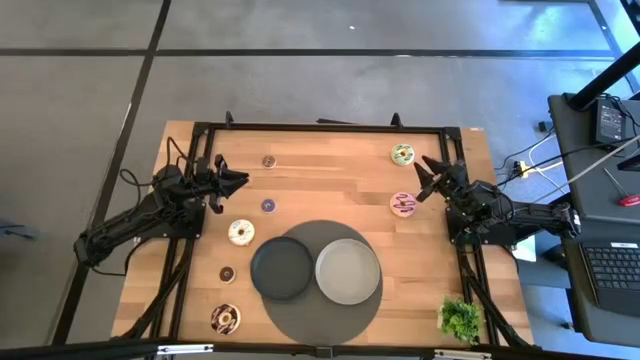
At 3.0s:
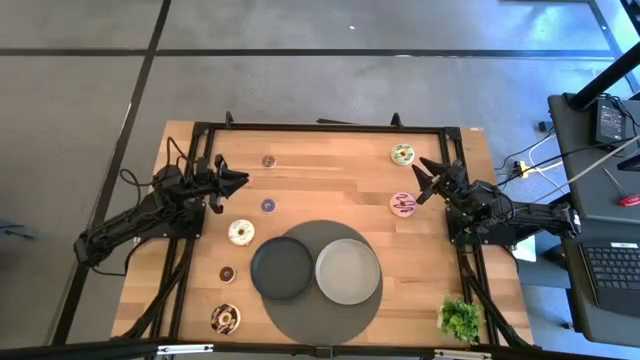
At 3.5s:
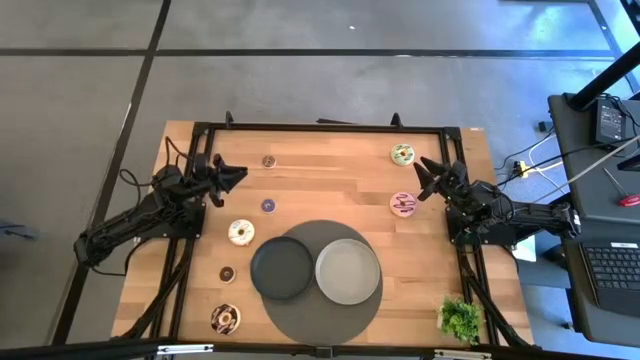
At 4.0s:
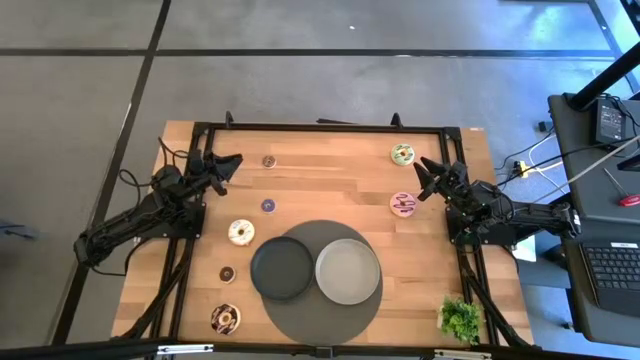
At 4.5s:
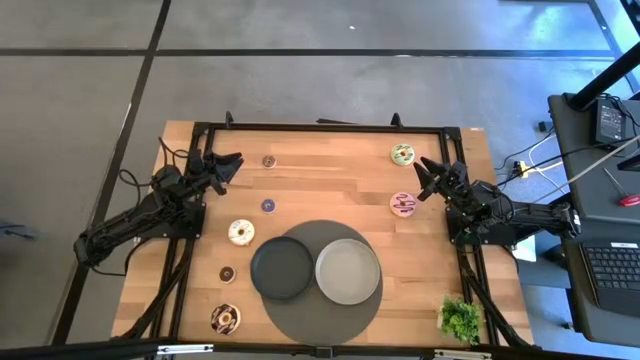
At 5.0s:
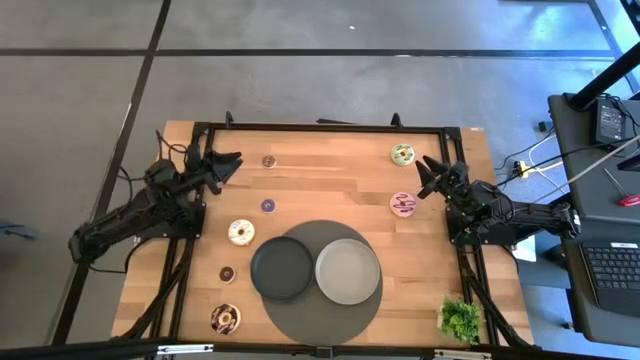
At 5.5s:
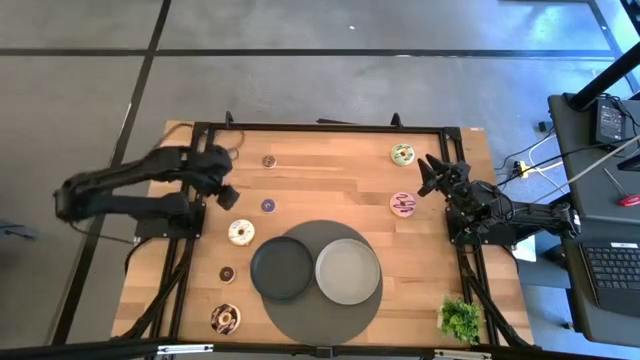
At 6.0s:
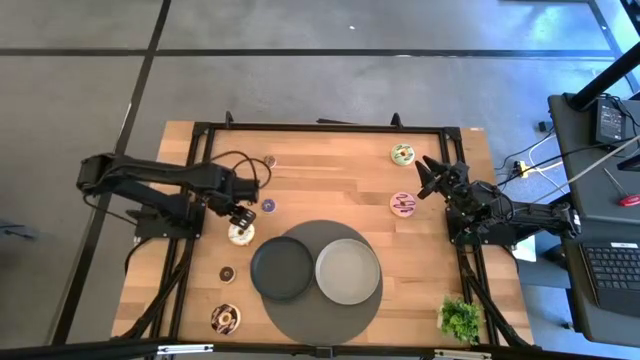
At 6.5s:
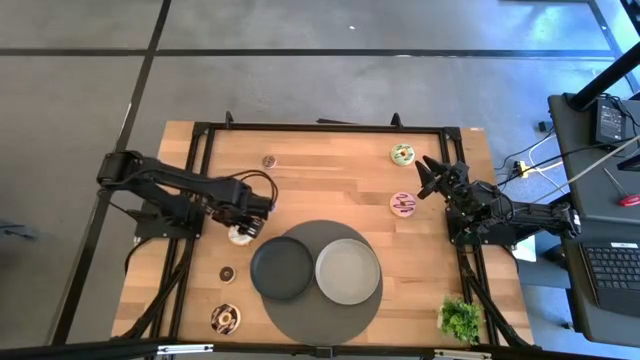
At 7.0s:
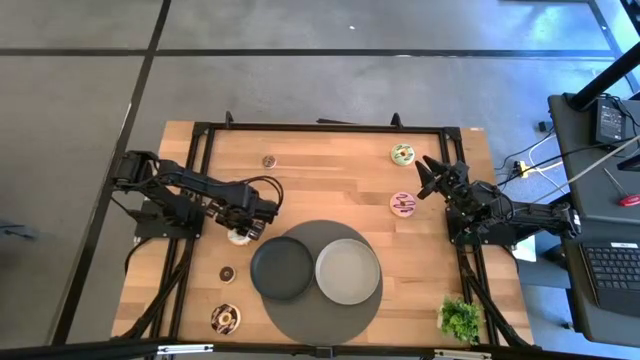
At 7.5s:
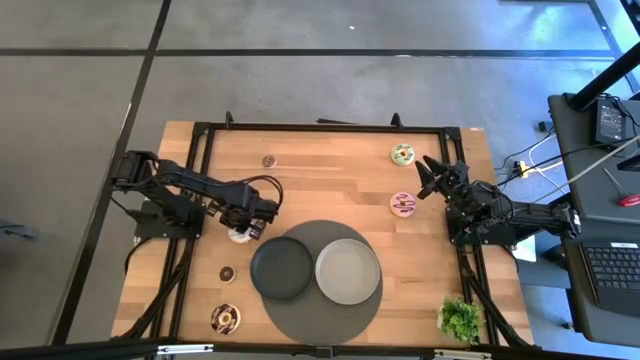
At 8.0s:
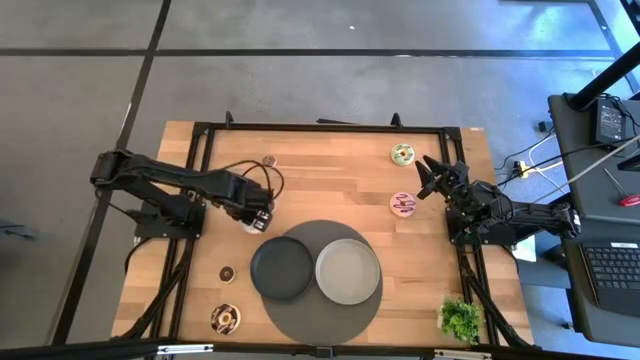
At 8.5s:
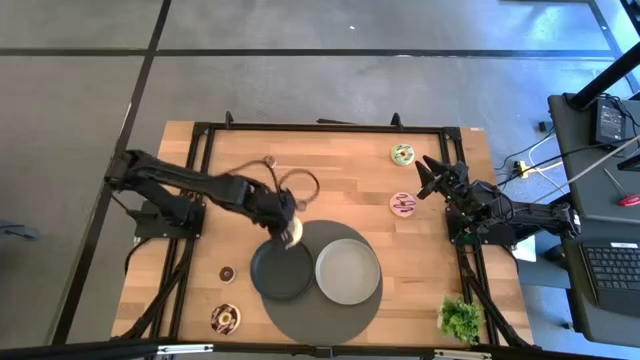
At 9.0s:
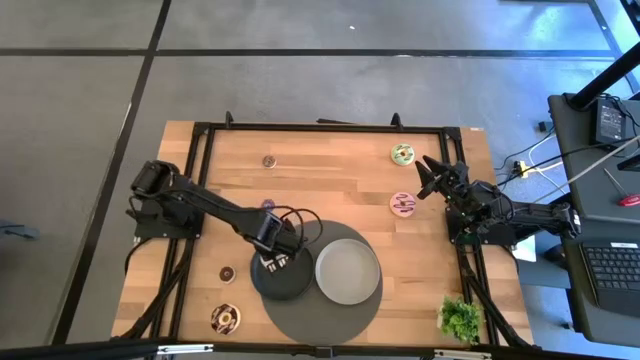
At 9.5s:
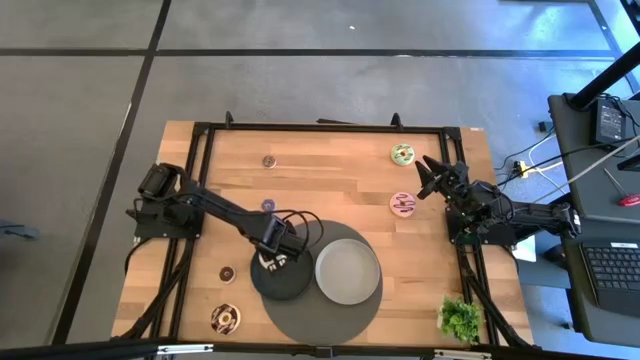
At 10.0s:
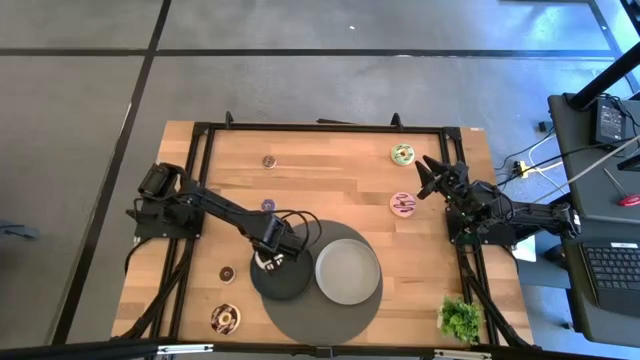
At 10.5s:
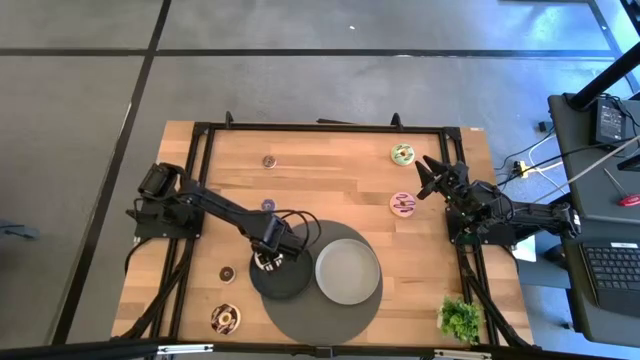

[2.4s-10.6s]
Task: Pick & Place donuts
Put the big white donut on the black plate

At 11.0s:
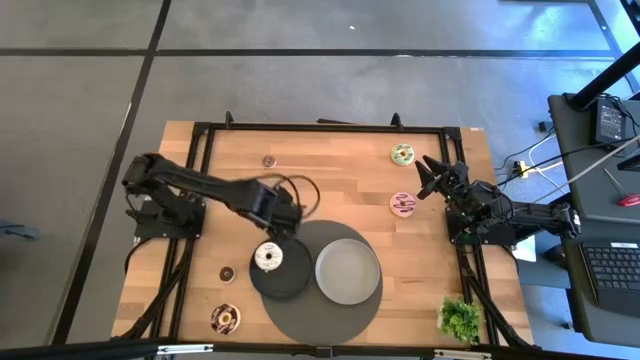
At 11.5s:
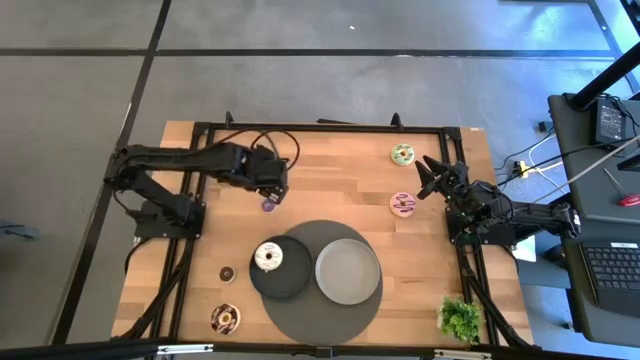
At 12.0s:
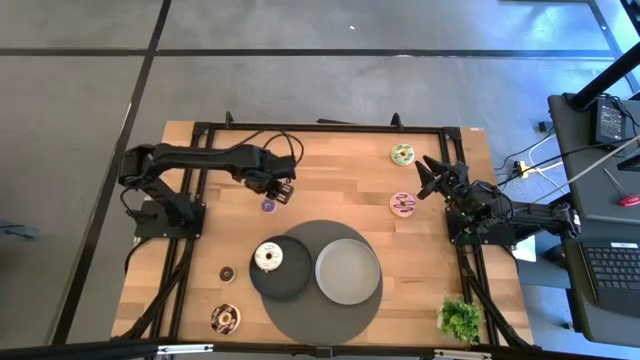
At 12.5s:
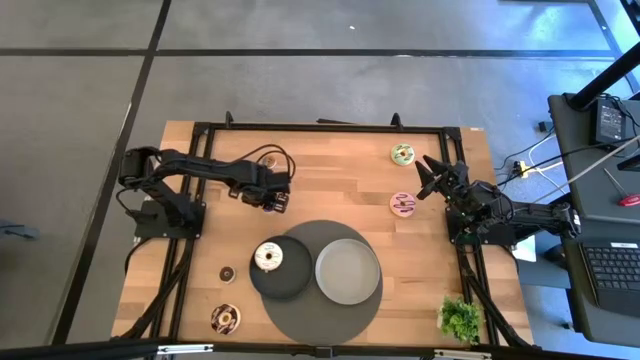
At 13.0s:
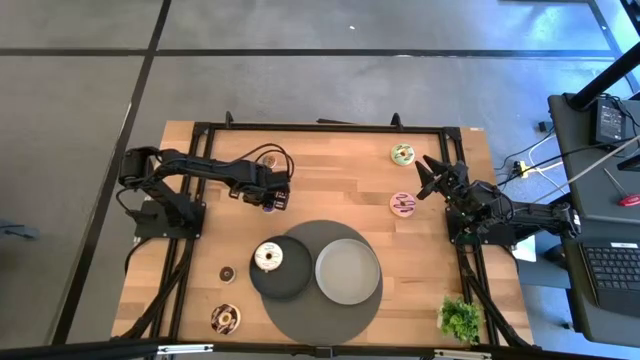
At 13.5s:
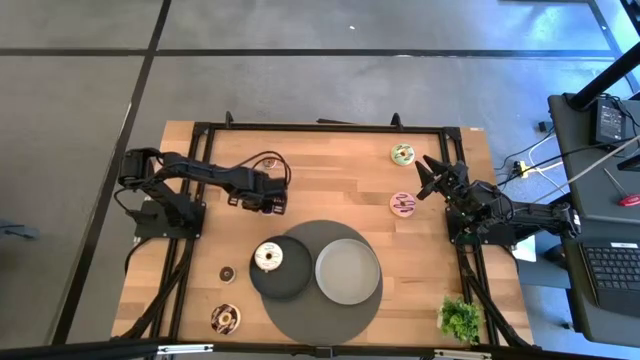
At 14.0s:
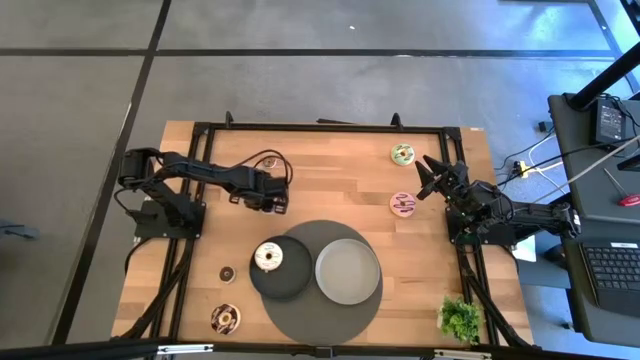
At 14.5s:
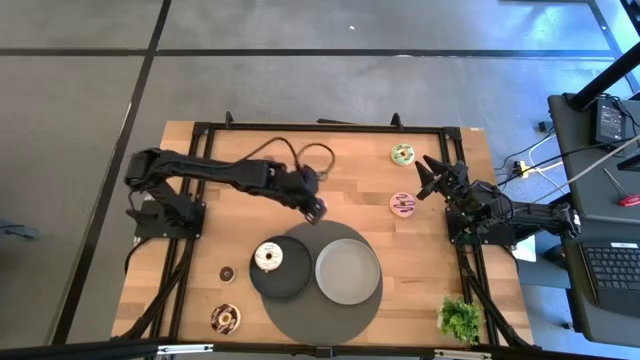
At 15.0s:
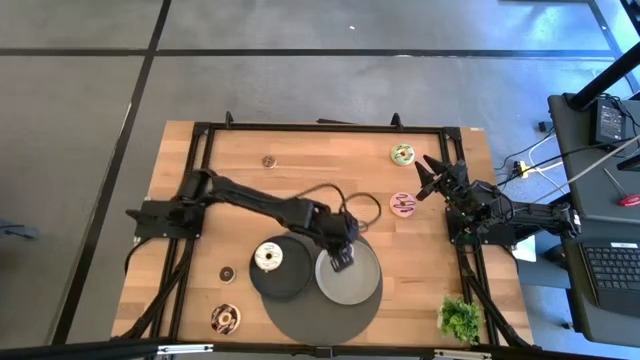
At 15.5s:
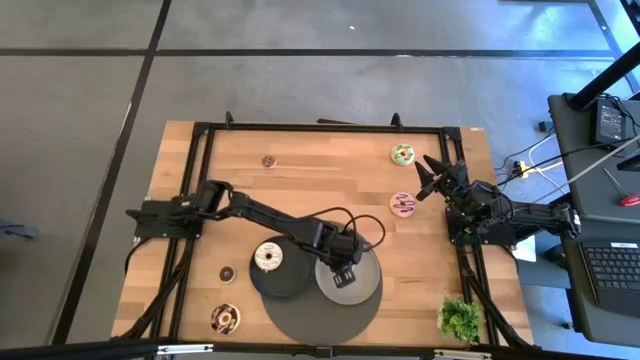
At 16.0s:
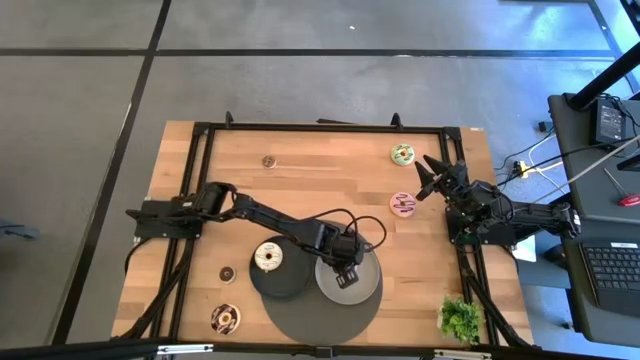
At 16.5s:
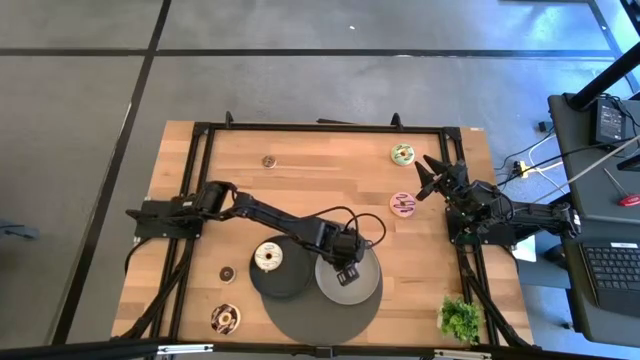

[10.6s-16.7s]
Put the small violet donut on the gray plate

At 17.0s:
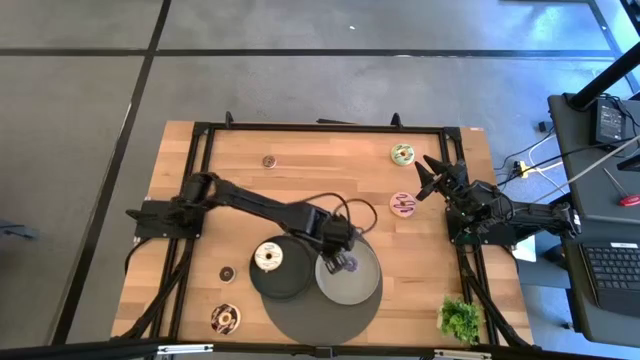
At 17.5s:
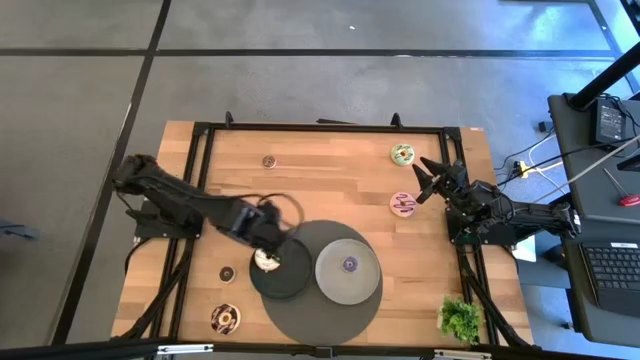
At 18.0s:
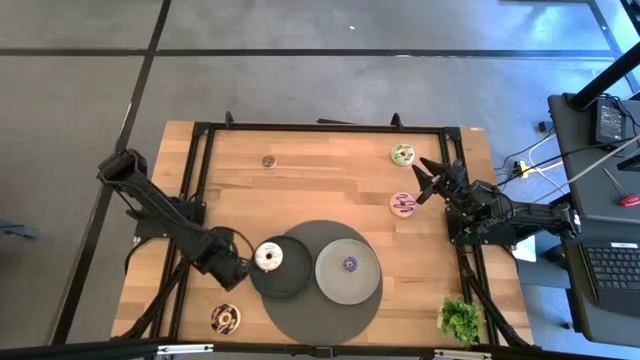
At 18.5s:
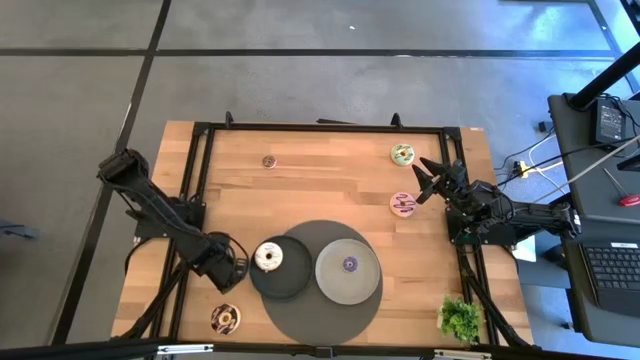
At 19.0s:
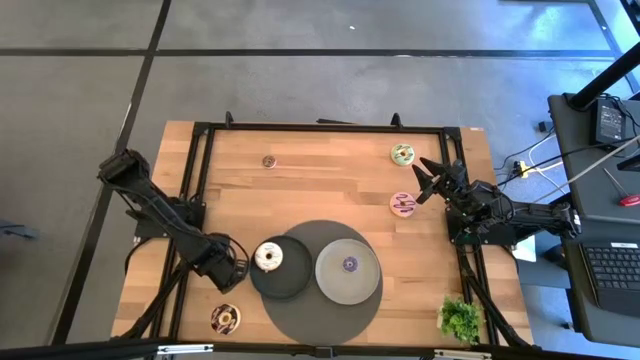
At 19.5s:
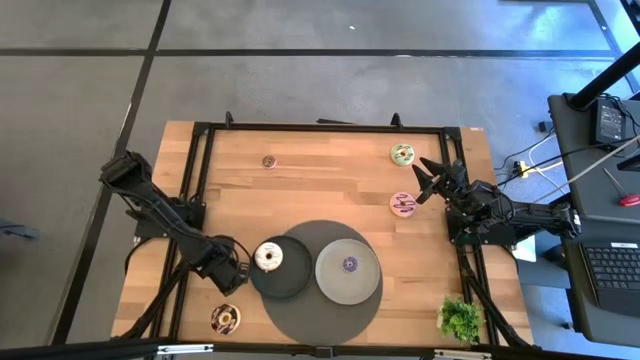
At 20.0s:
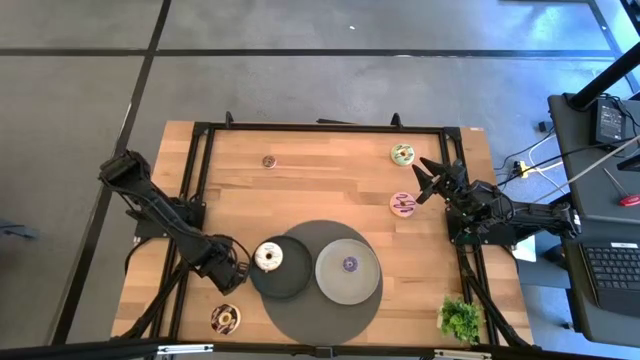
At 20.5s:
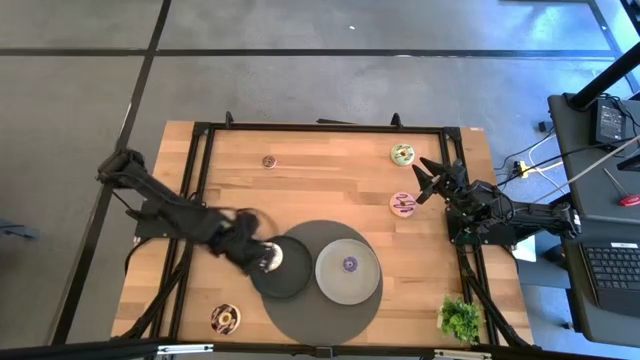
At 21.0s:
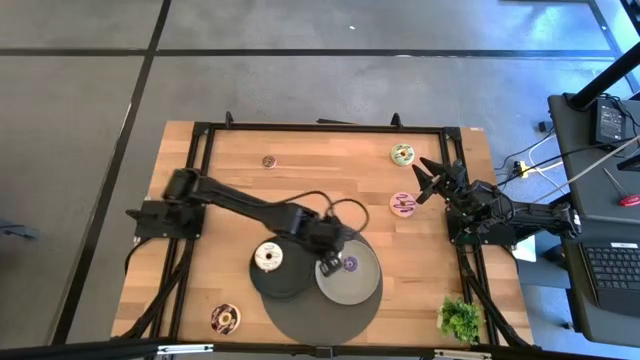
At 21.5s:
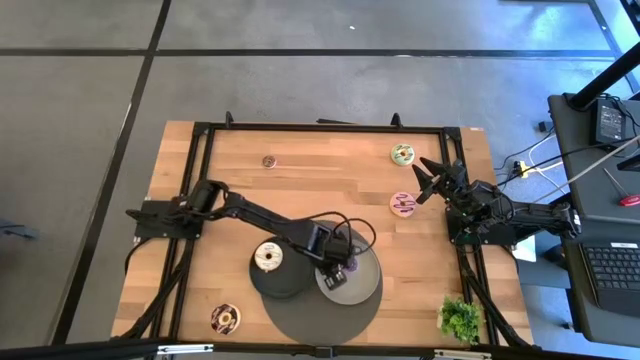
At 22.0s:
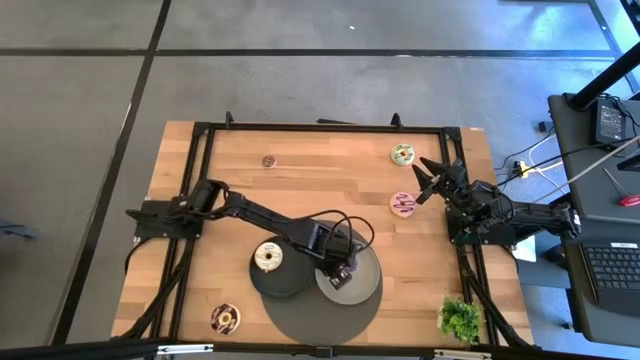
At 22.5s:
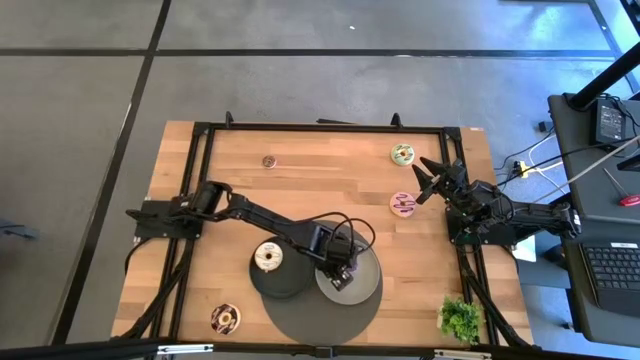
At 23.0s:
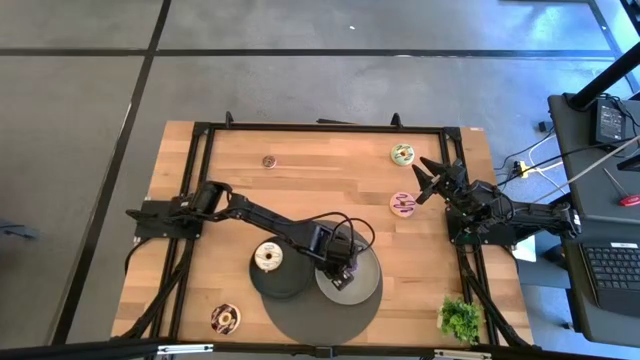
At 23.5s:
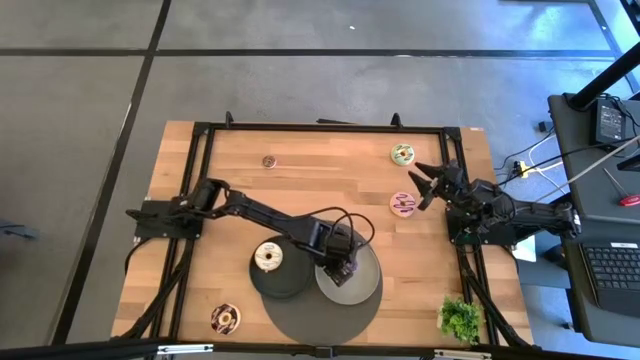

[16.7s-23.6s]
Put the small dark brown donut on the gray plate
